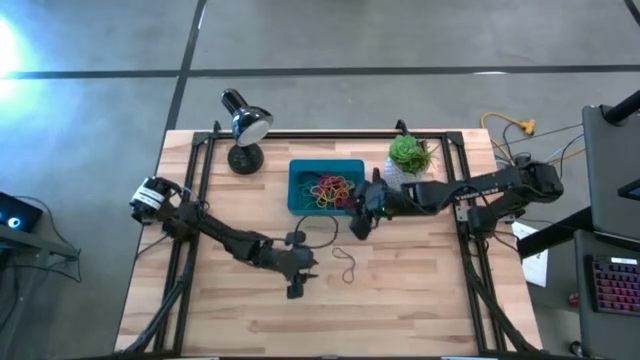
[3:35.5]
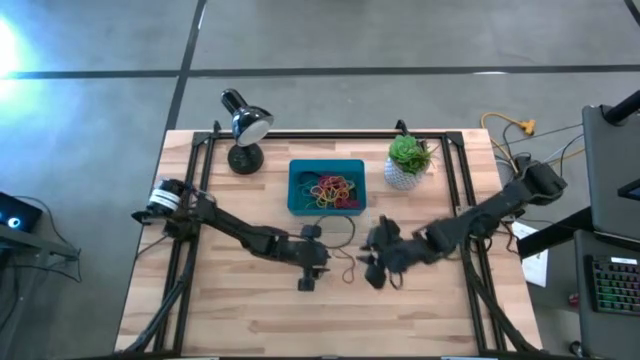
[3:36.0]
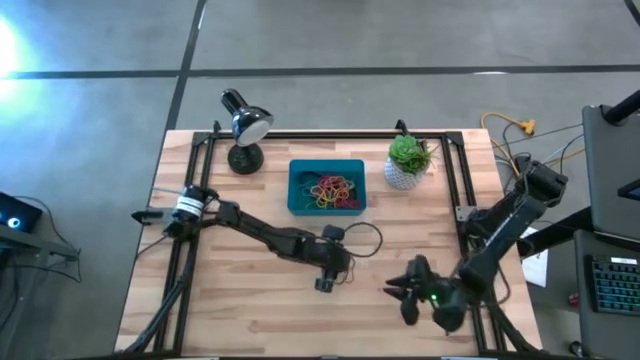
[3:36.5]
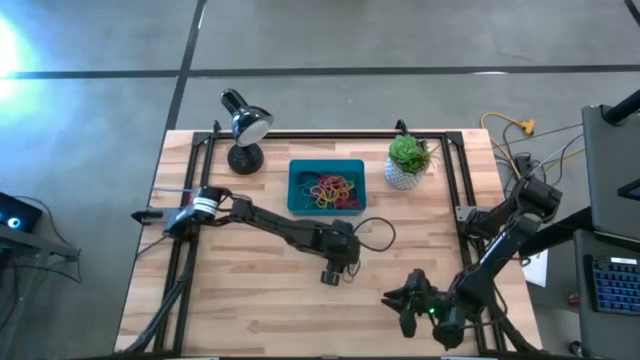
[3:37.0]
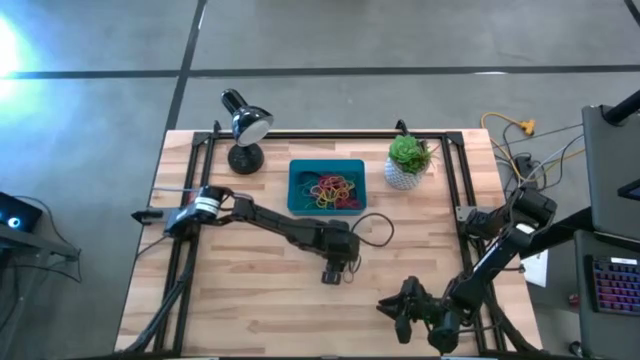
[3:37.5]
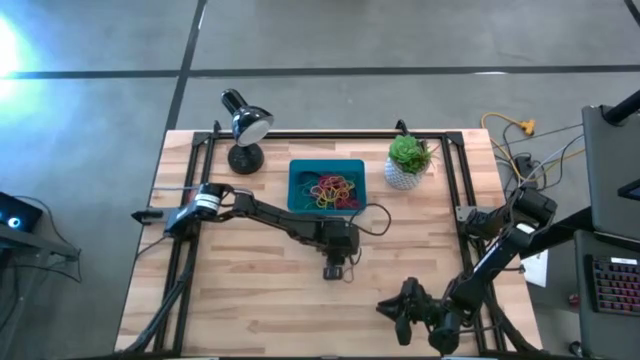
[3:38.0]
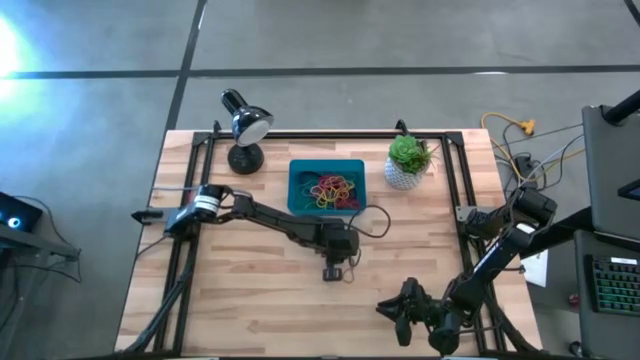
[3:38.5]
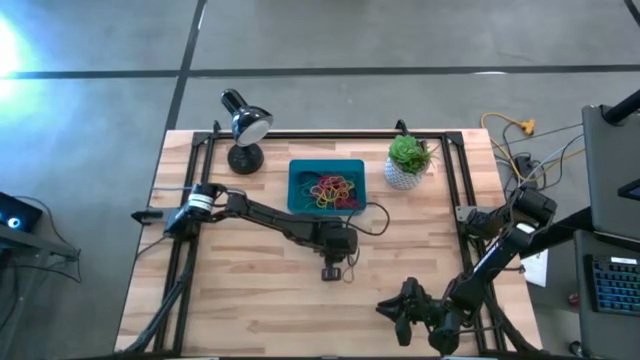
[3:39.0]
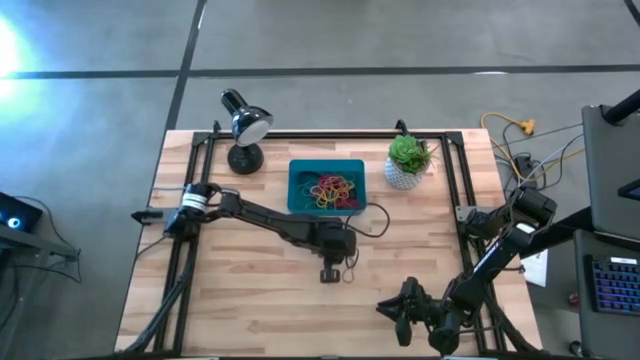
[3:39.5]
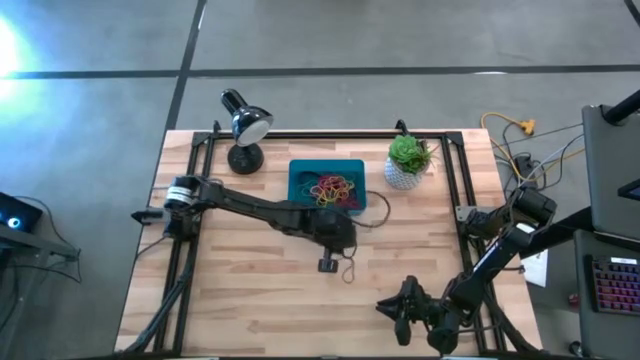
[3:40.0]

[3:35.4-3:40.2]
Task: Pick and place rubber bands into bin
Put the purple rubber band into the dark blue bin

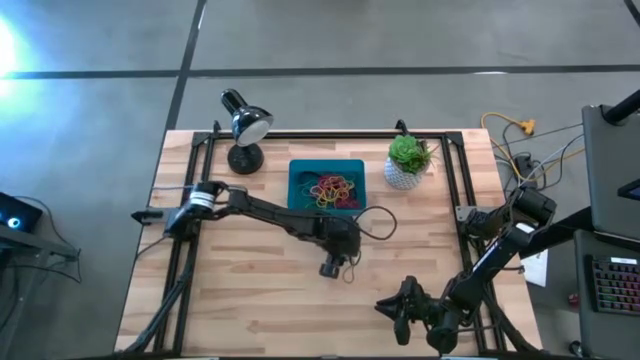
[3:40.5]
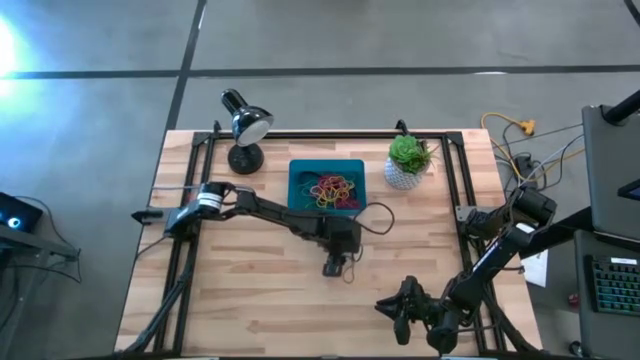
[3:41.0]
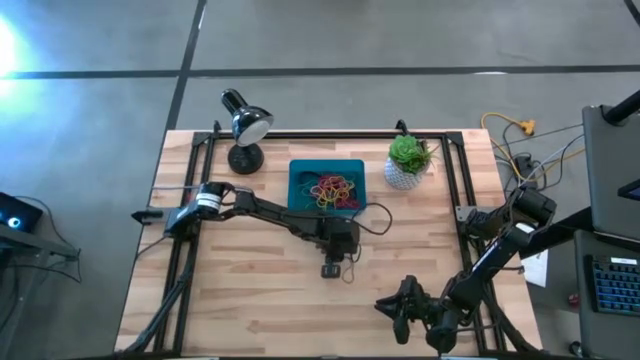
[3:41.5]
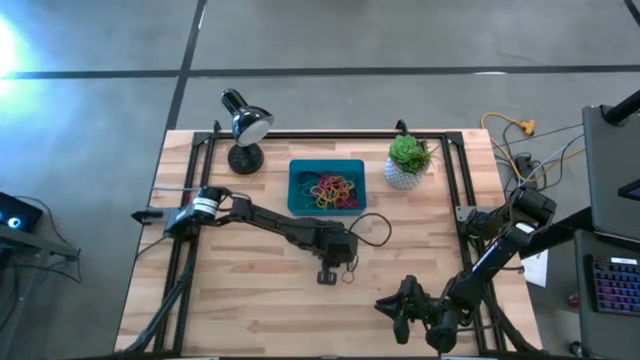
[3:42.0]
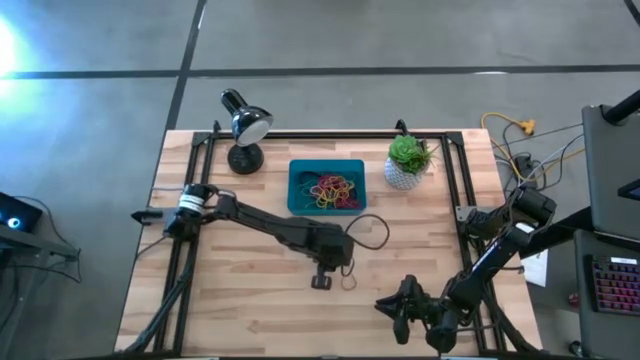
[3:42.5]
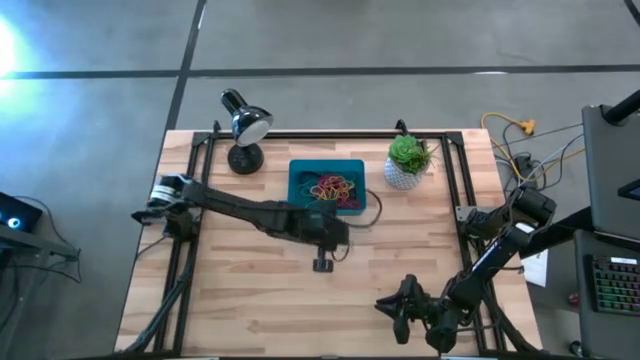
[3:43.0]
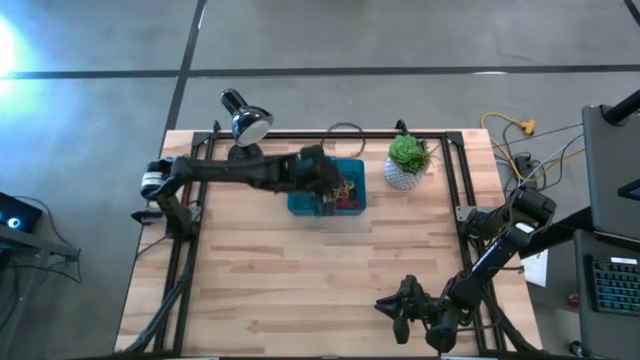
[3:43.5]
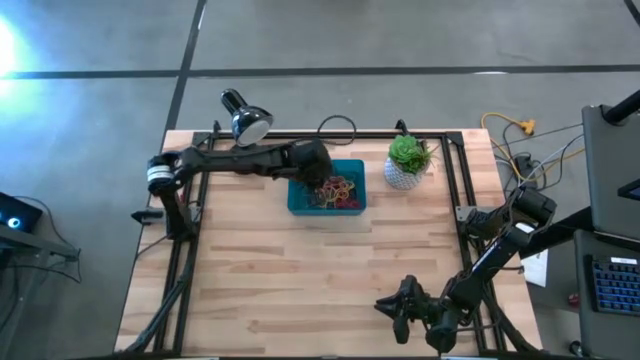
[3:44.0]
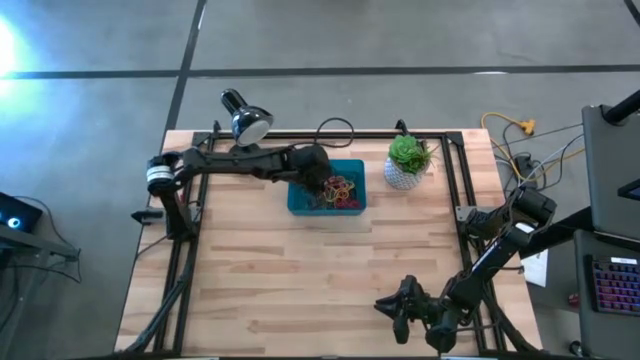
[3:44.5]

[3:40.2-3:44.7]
Put the purple rubber band into the dark blue bin

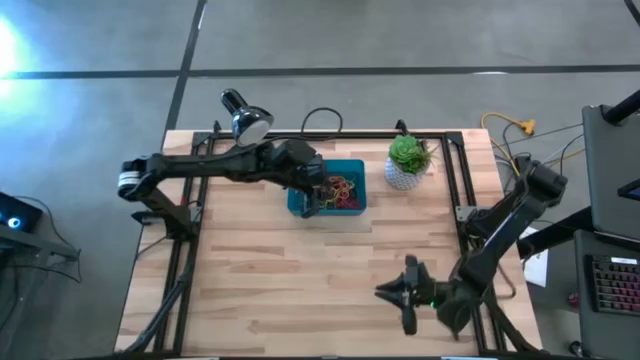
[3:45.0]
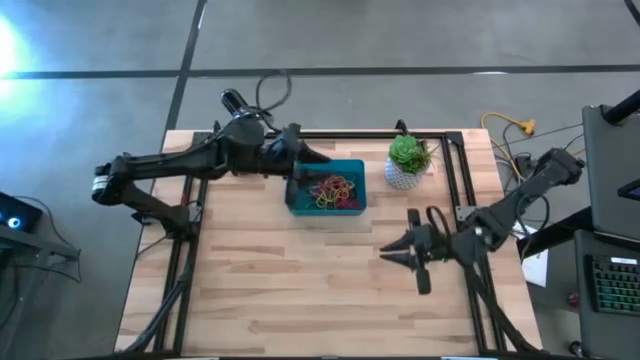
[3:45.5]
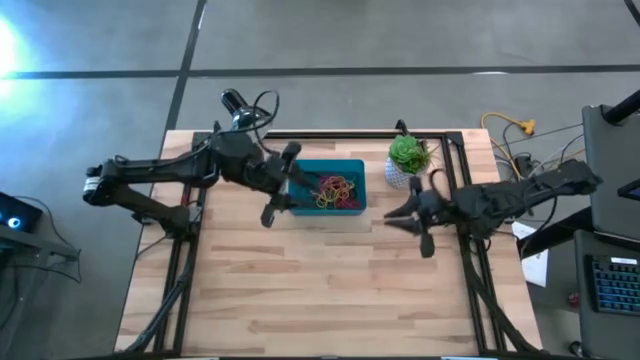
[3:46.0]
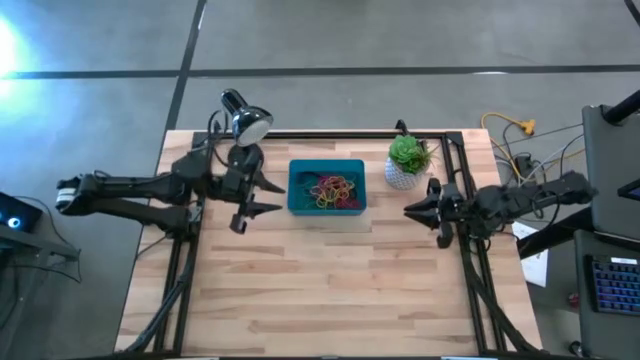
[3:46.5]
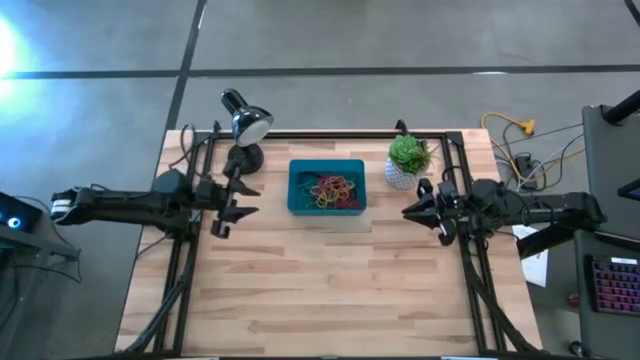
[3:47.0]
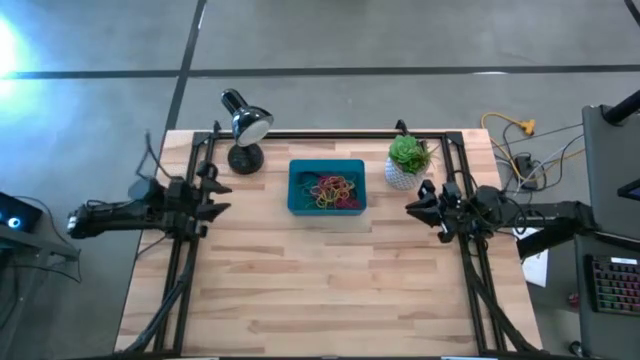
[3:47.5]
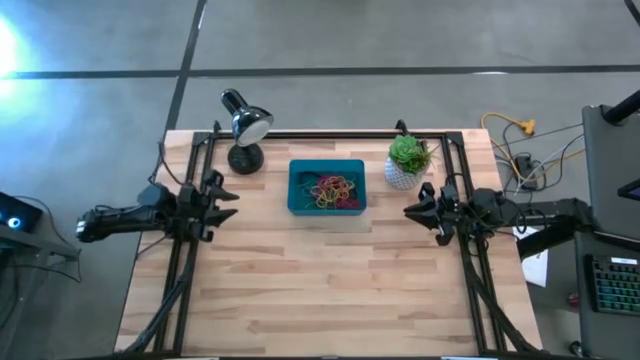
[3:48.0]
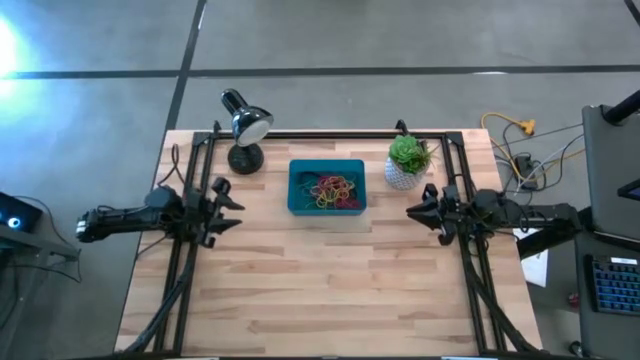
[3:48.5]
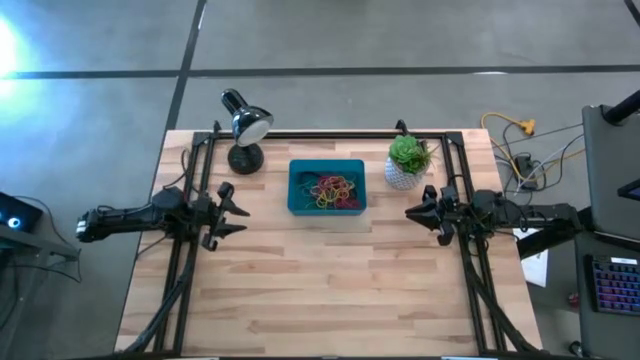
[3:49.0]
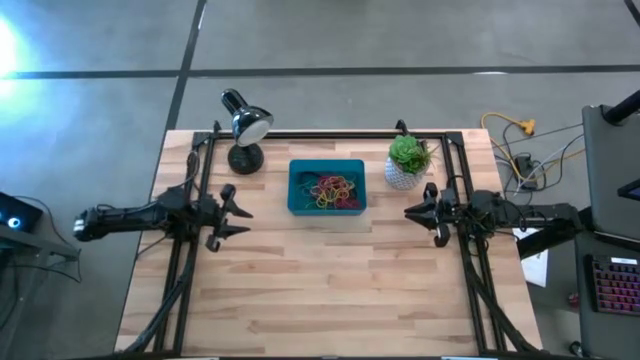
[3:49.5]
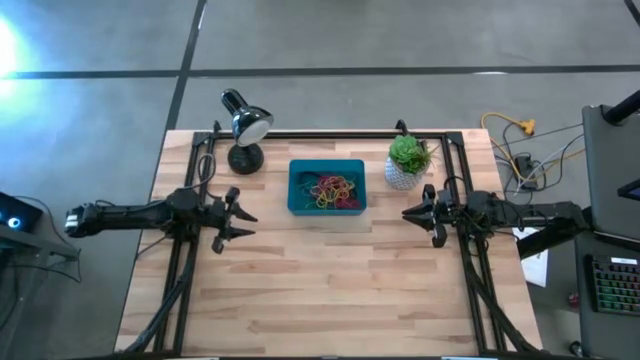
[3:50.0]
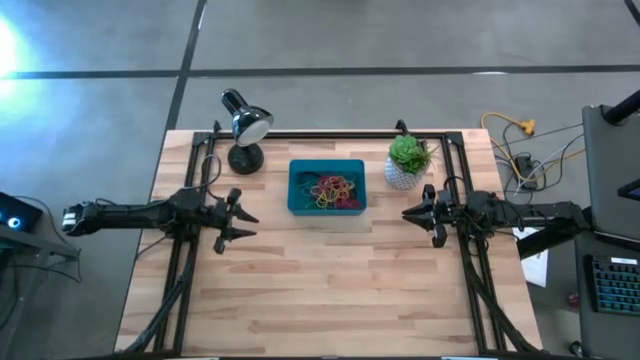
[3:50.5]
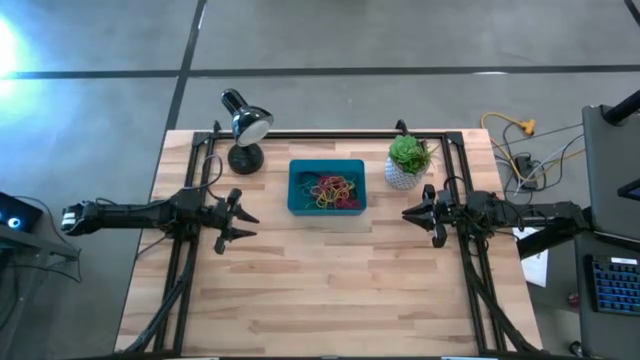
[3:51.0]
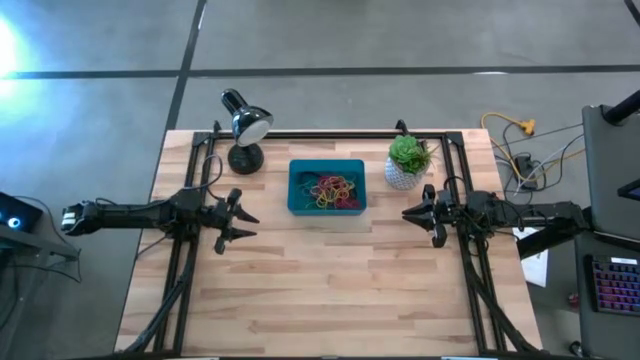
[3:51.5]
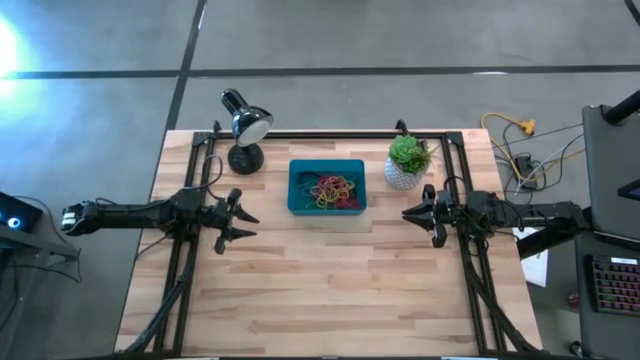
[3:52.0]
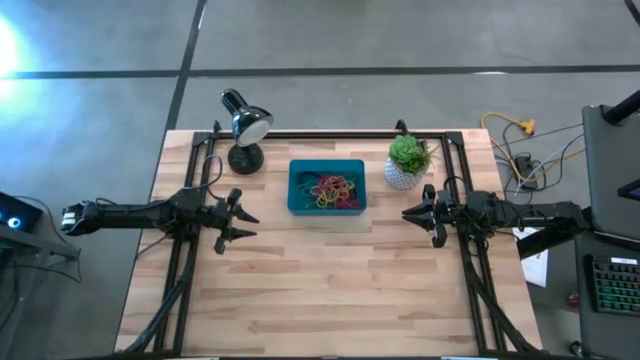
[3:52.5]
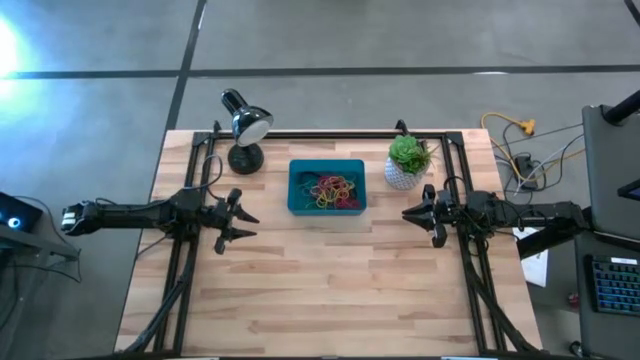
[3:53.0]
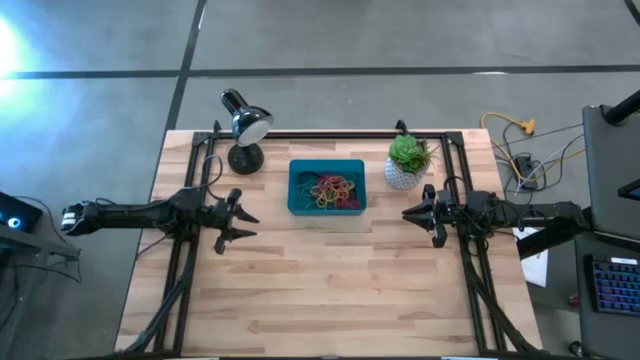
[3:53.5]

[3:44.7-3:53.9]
Return to Home Position

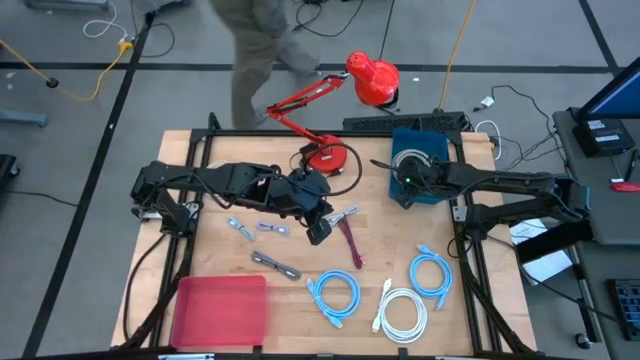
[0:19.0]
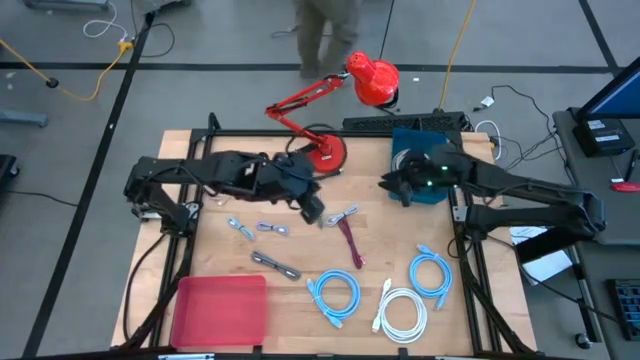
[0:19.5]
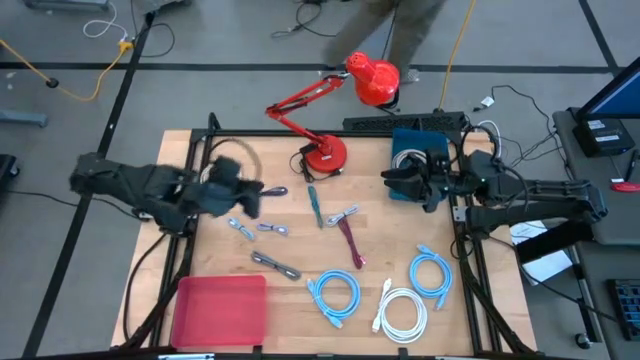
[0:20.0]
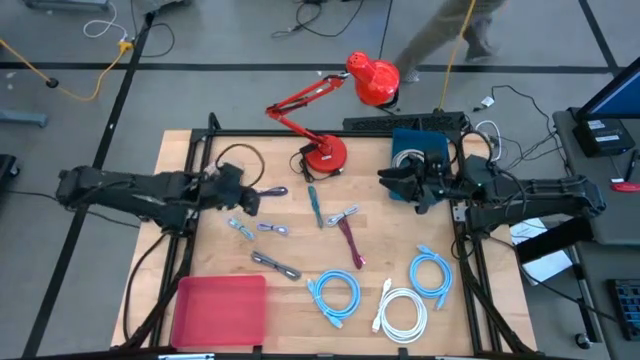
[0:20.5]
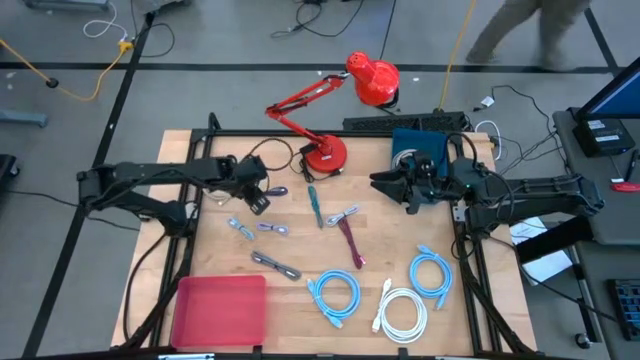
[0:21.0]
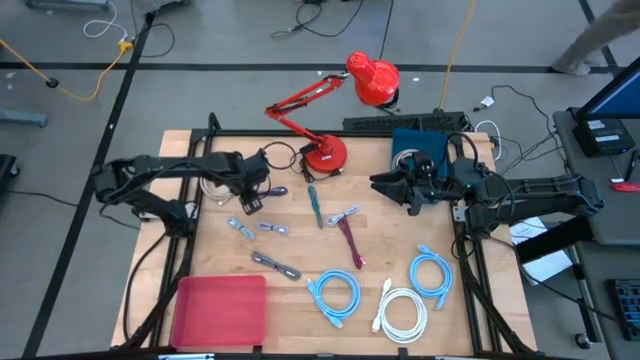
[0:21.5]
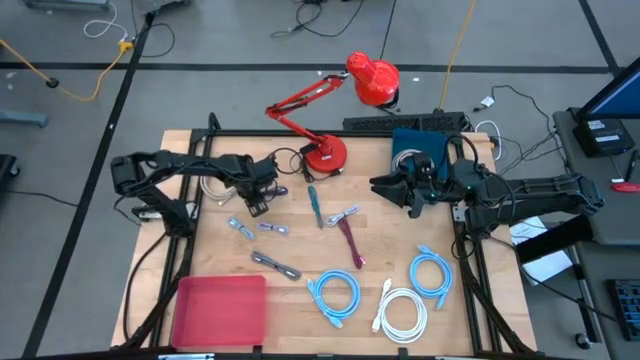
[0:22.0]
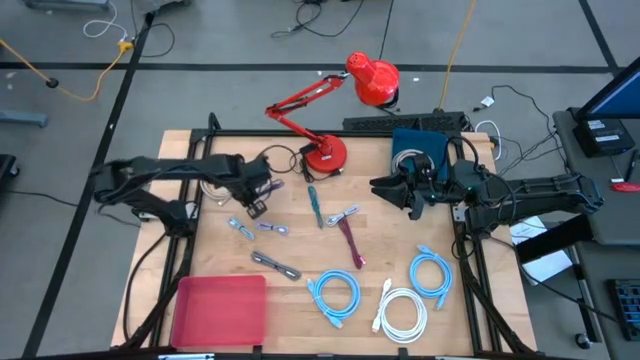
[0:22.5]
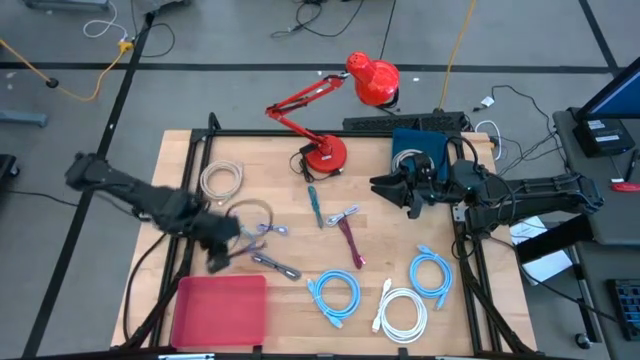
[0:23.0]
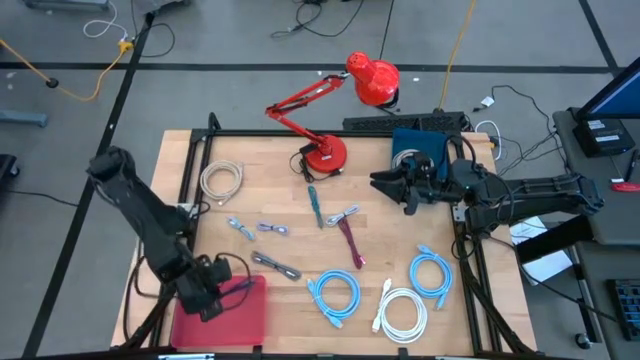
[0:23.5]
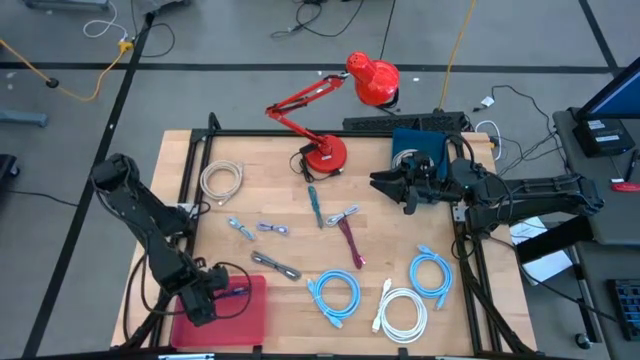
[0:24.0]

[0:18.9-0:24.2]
Task: Sort cables
Put the violet charger cable into the pink bin
